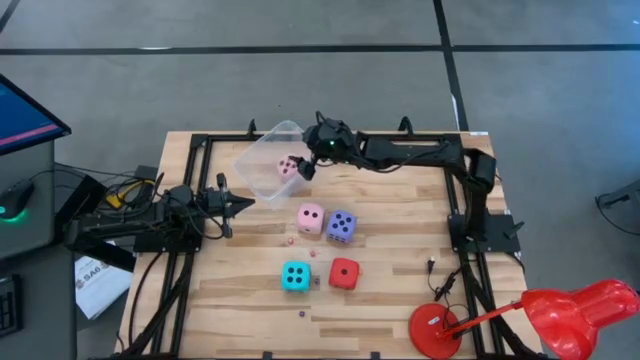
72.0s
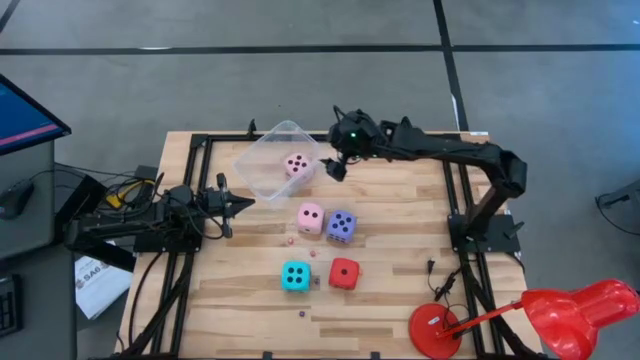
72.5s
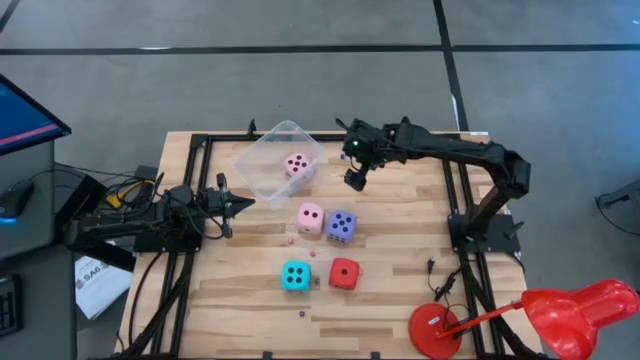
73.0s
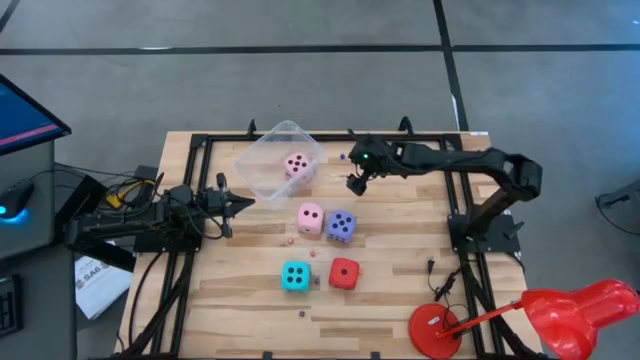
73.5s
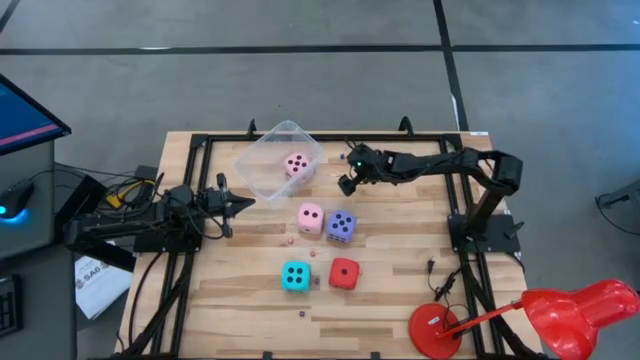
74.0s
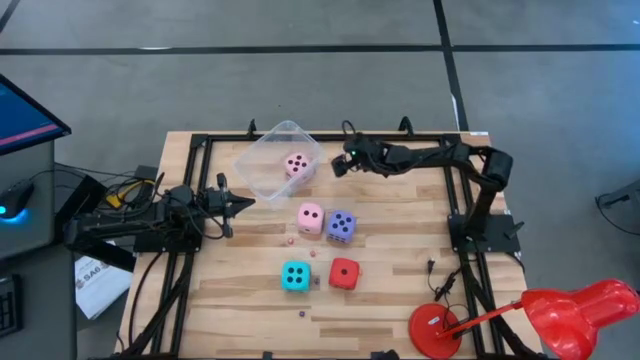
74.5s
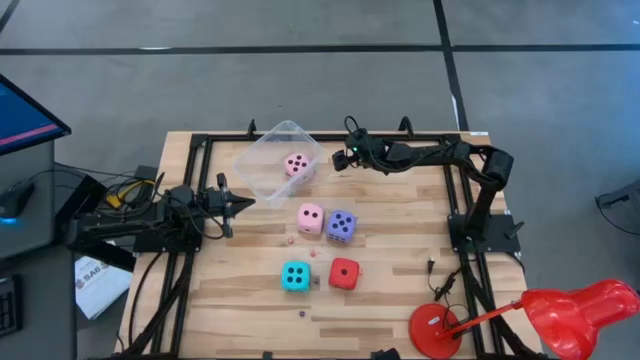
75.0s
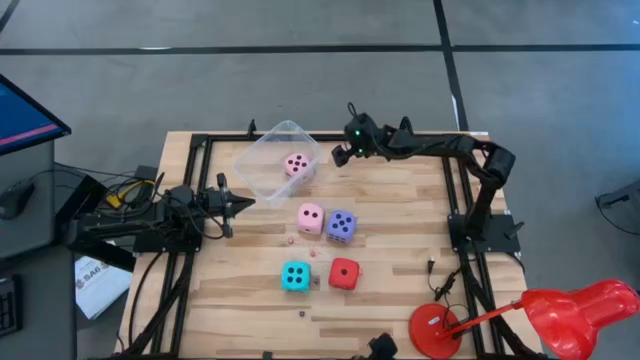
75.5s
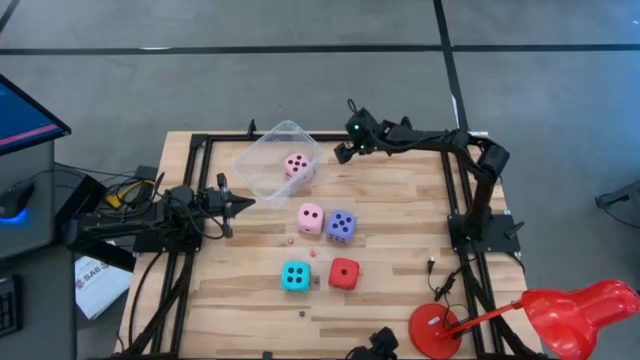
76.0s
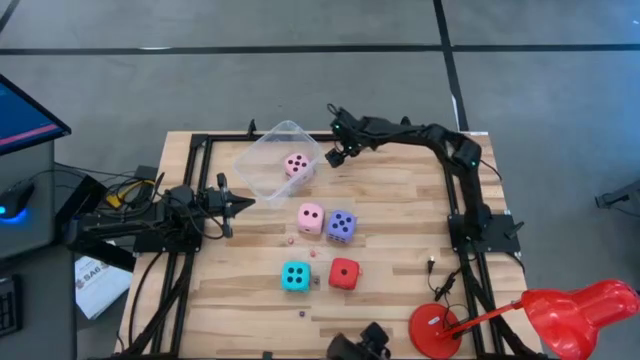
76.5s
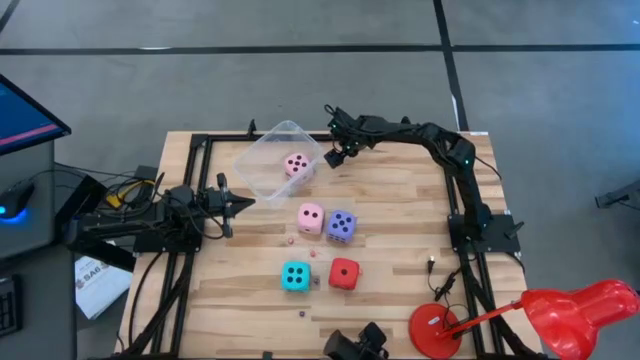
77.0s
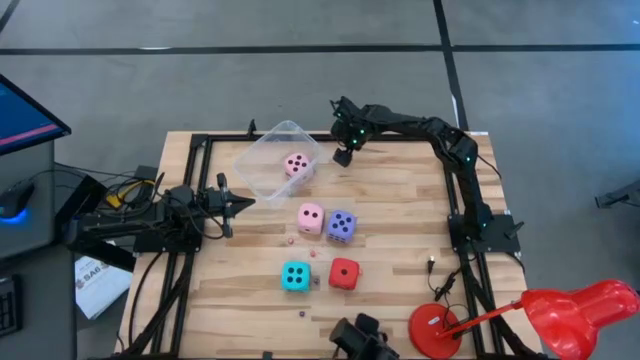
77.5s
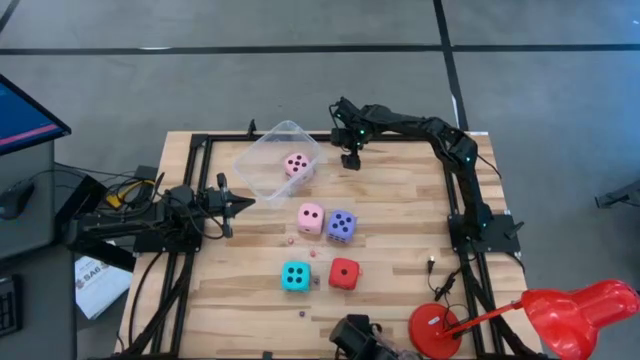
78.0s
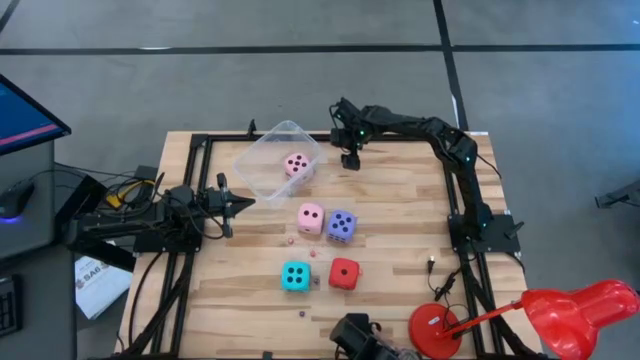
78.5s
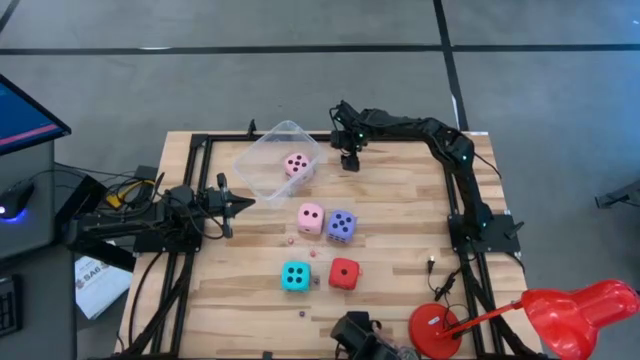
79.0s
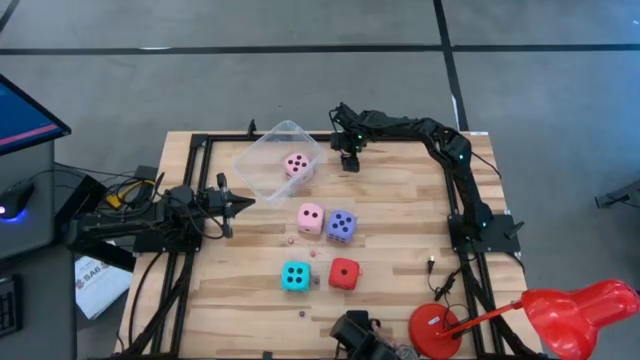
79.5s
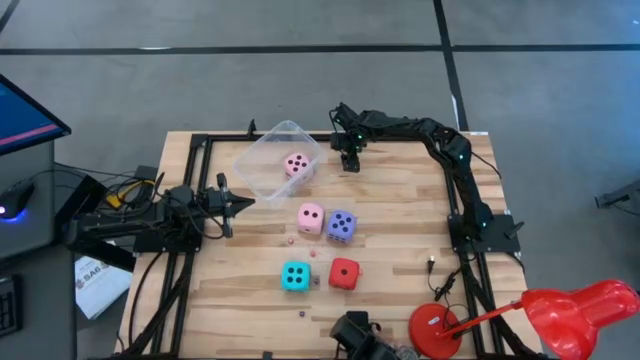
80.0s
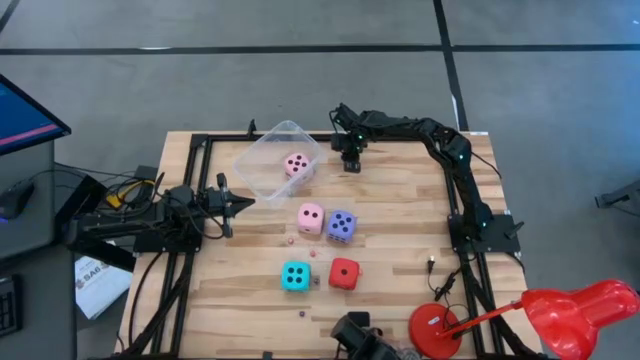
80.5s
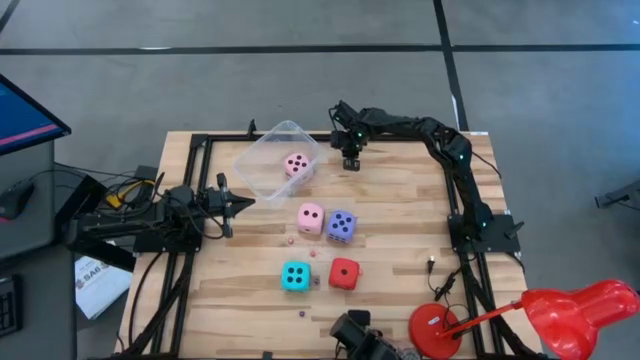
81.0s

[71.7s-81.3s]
Task: Pick & Place Dice
Put the small blue dice into the transparent container

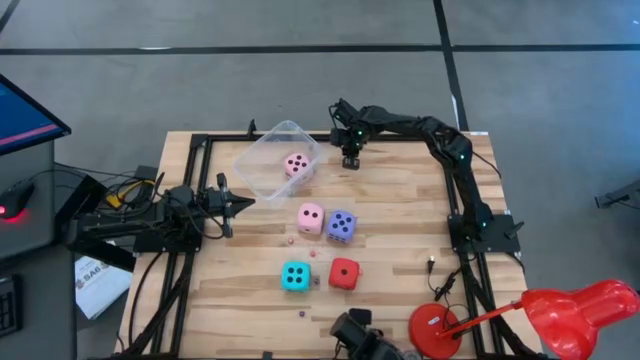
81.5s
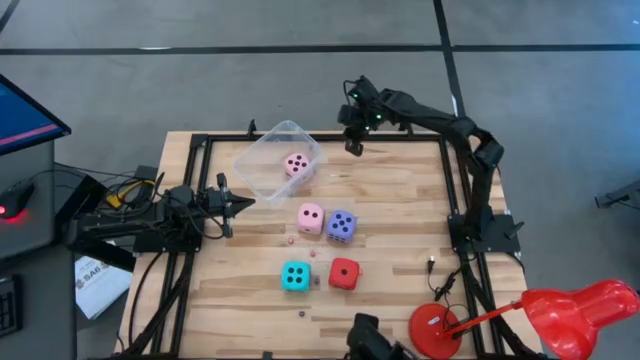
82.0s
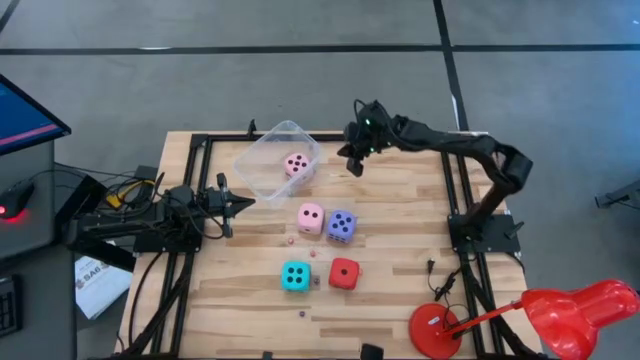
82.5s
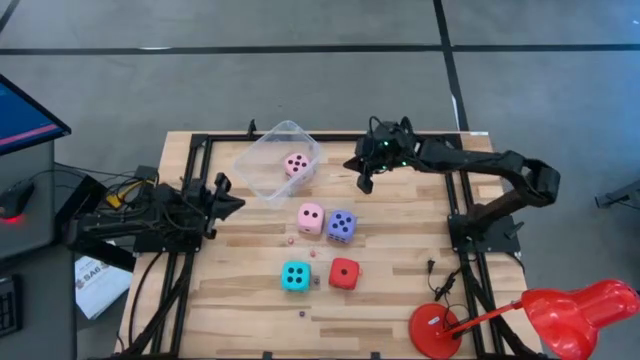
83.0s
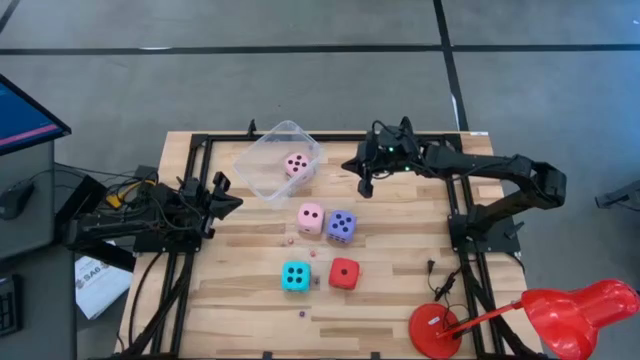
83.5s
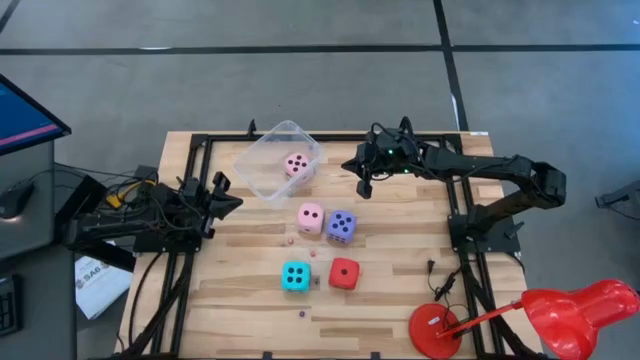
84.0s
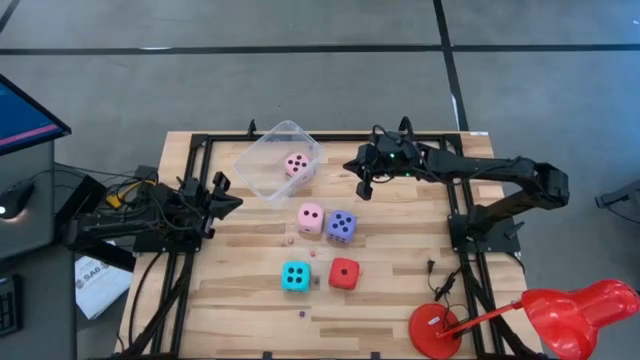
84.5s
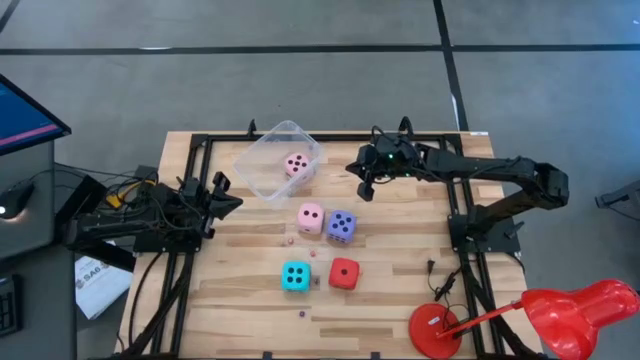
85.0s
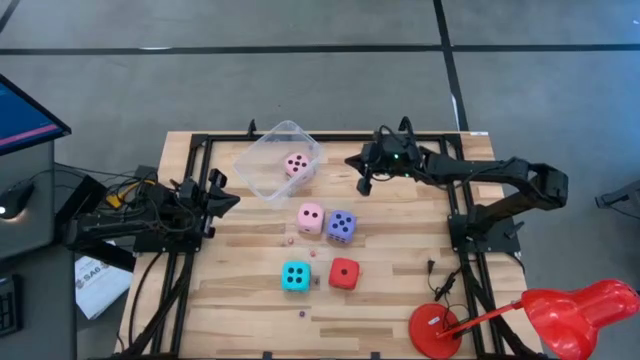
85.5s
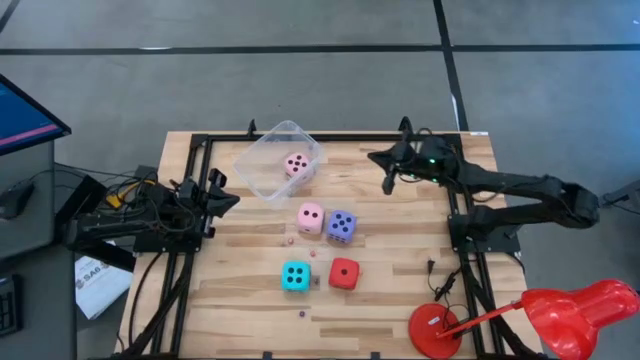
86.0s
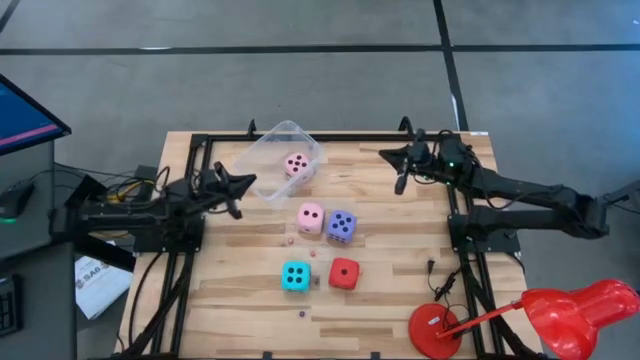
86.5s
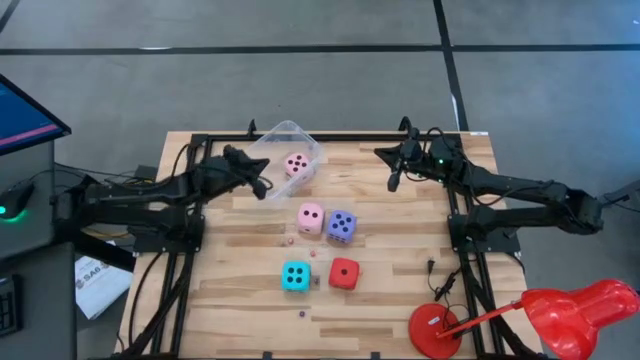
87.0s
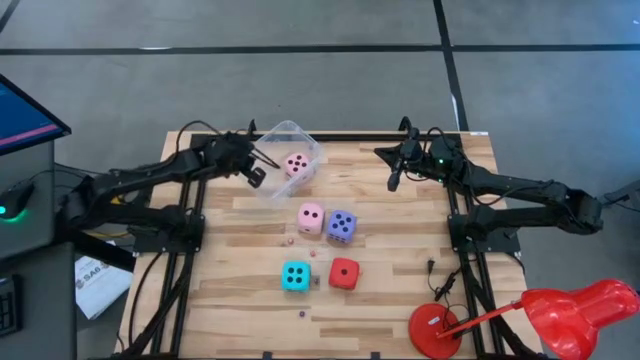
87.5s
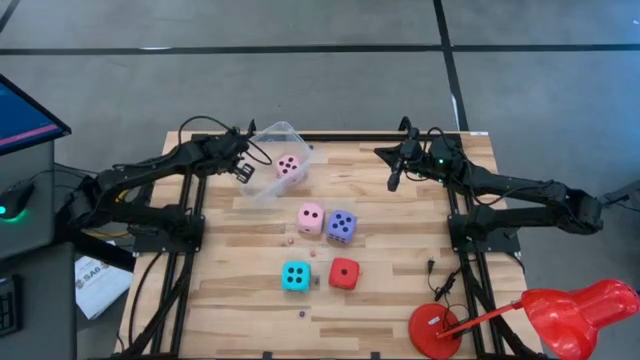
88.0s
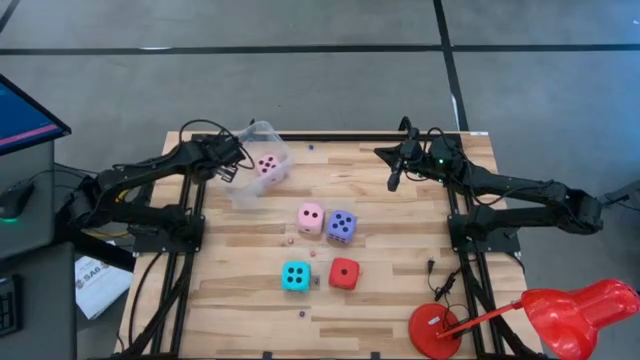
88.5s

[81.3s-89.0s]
Move the transparent container

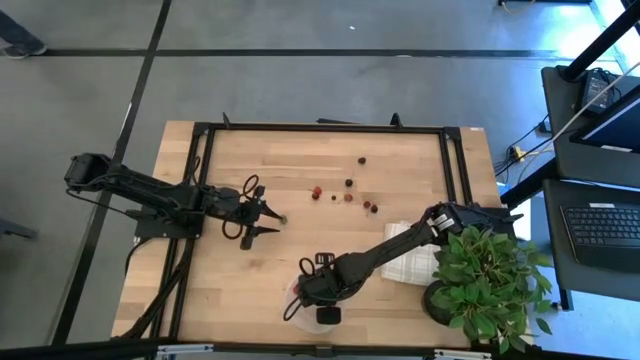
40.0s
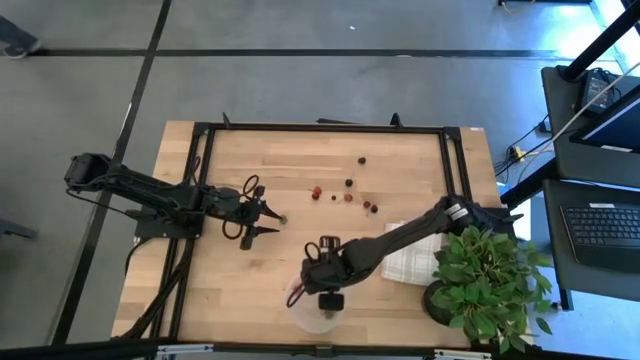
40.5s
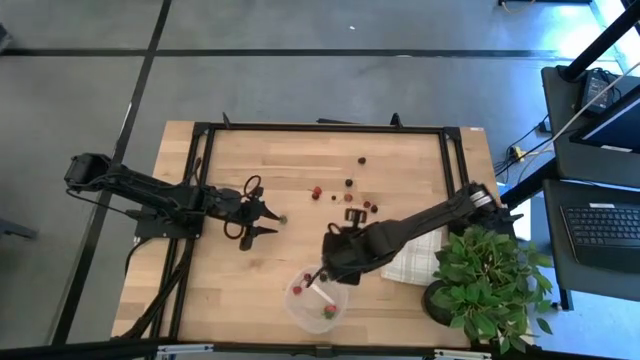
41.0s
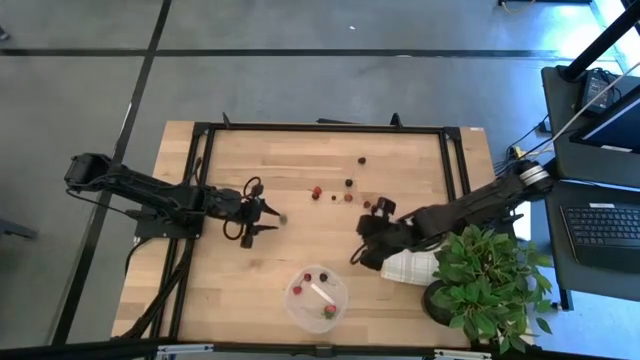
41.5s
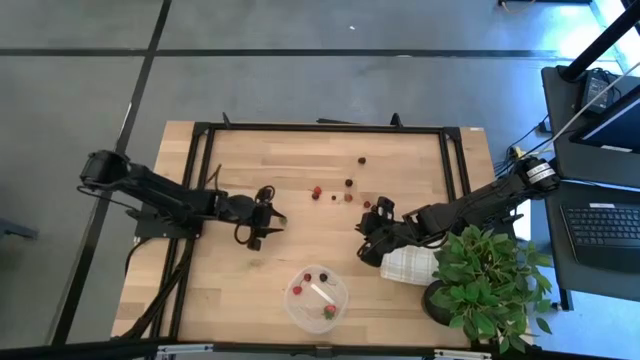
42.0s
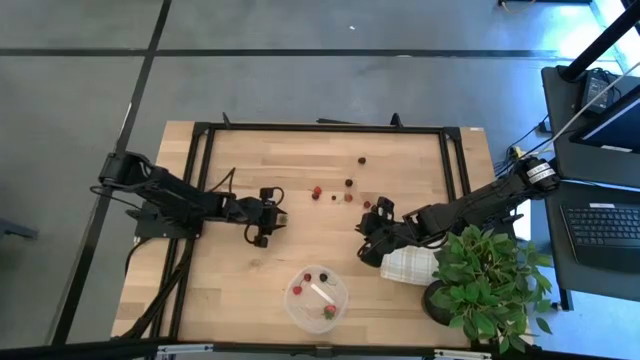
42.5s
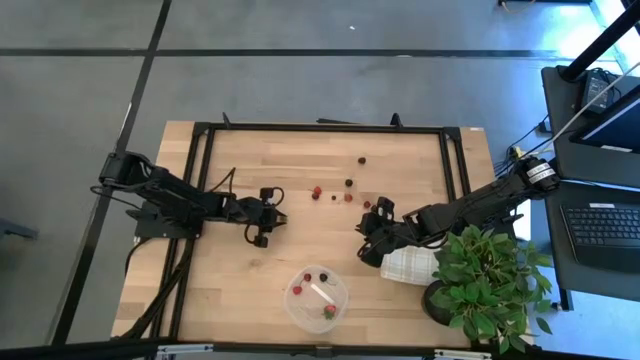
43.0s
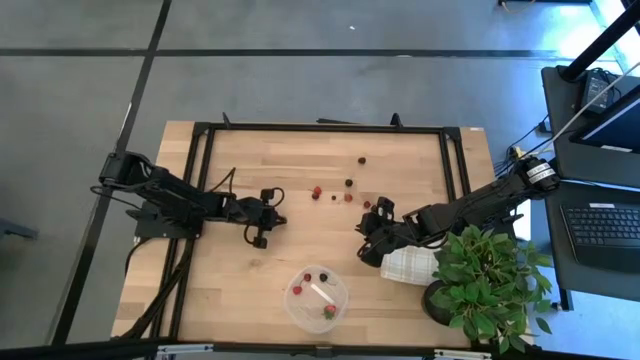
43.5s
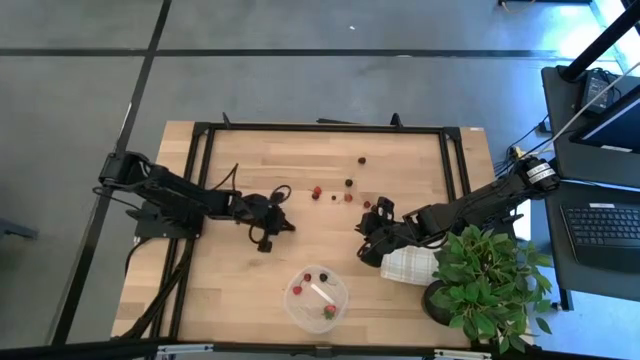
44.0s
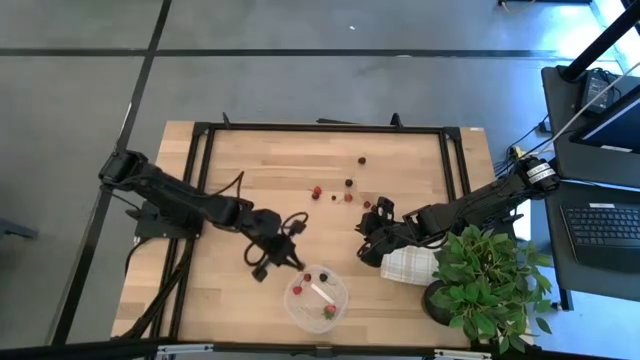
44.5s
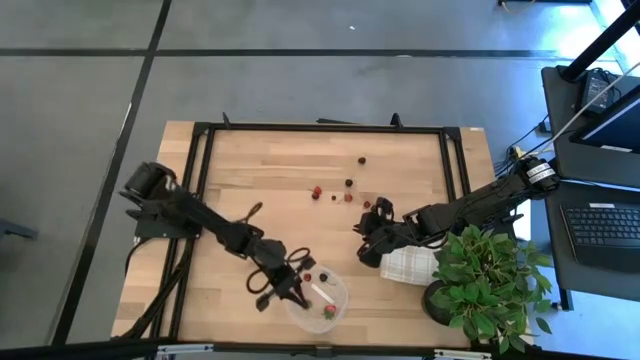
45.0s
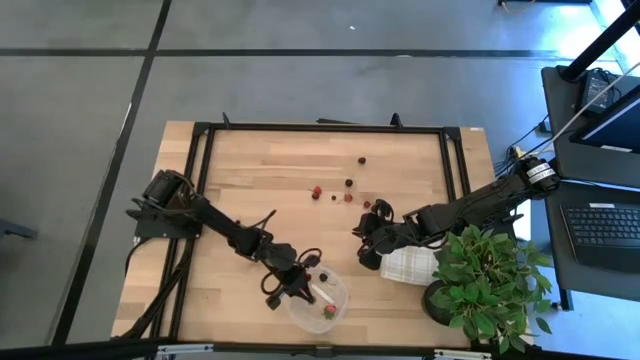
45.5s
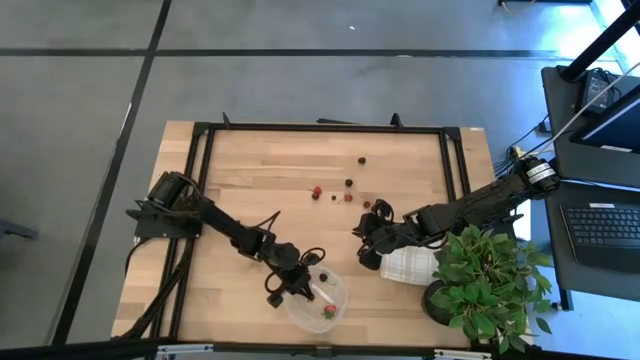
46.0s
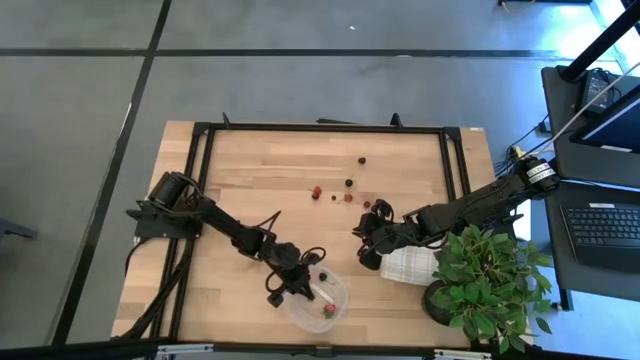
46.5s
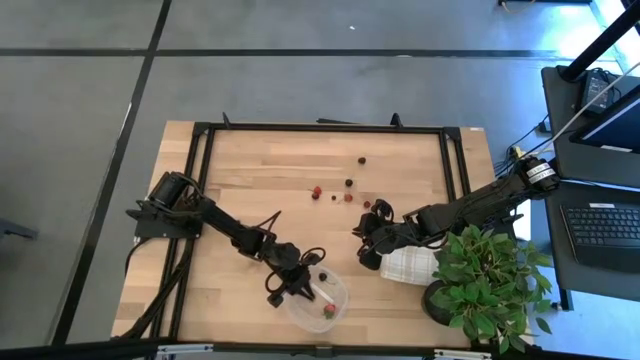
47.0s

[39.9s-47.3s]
Task: Pick and placing Produce into tupperware
Put the strawberry in the bottom transparent bin
